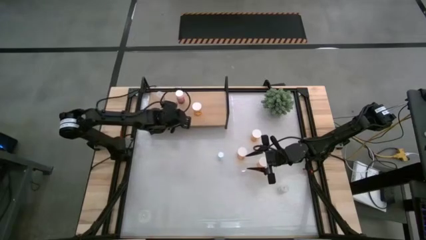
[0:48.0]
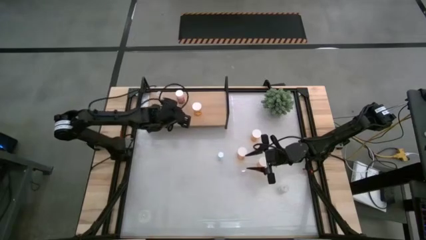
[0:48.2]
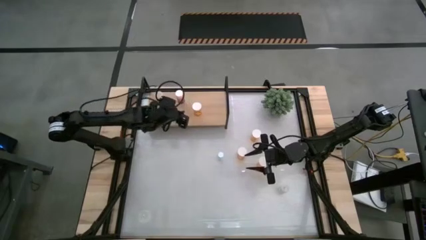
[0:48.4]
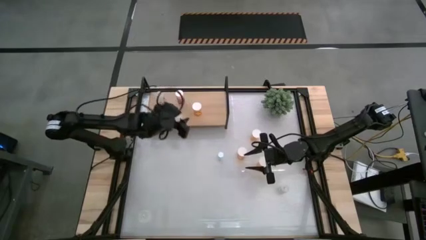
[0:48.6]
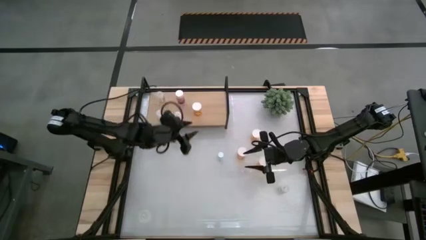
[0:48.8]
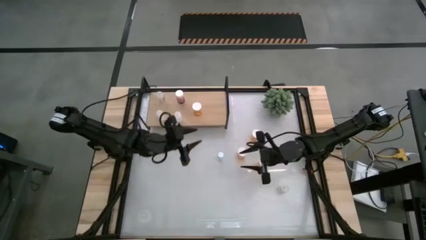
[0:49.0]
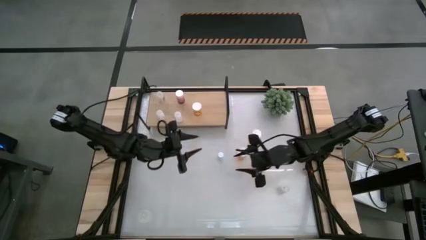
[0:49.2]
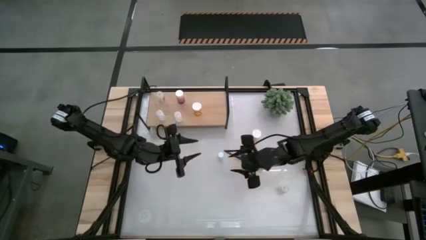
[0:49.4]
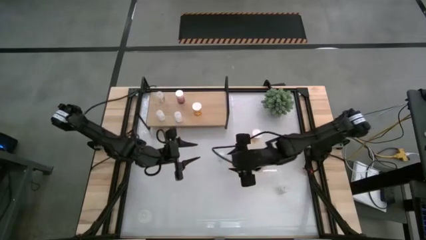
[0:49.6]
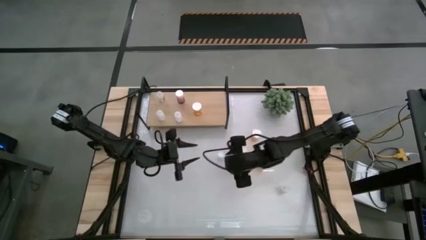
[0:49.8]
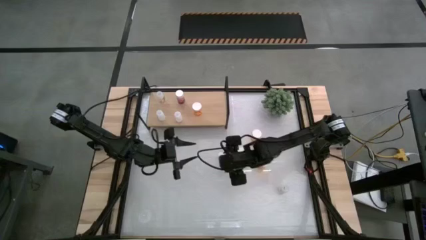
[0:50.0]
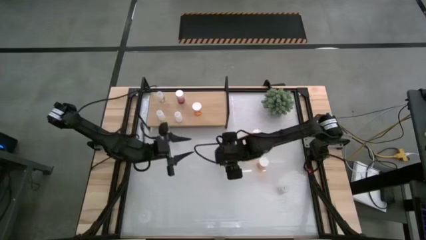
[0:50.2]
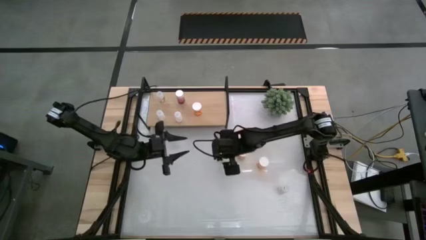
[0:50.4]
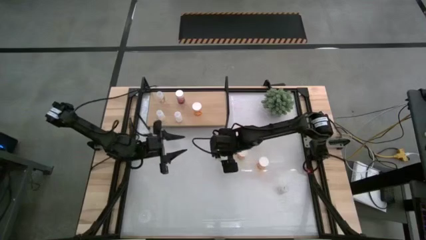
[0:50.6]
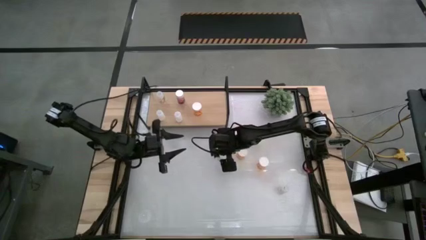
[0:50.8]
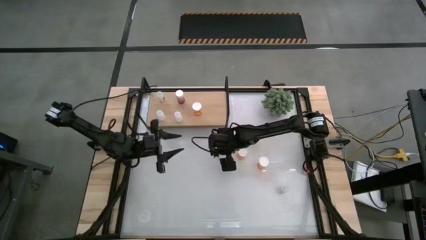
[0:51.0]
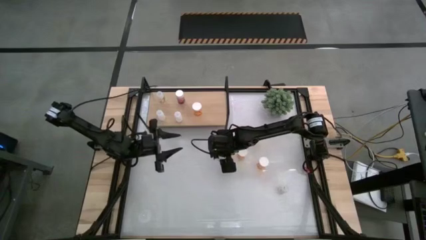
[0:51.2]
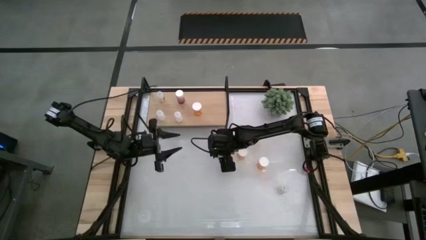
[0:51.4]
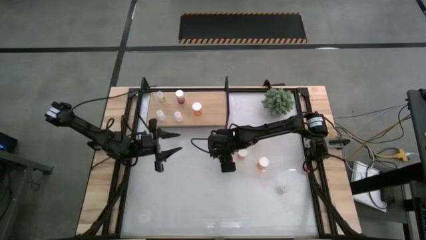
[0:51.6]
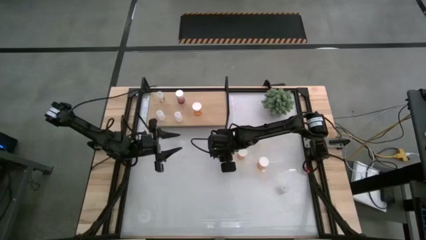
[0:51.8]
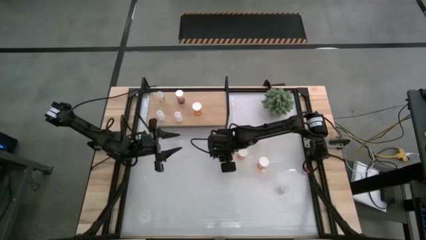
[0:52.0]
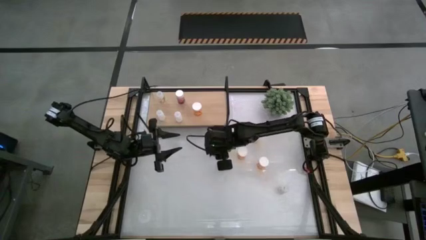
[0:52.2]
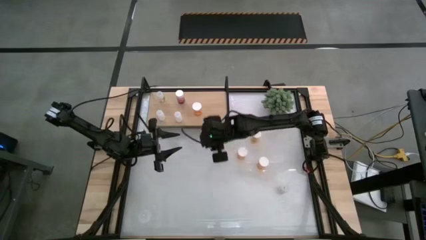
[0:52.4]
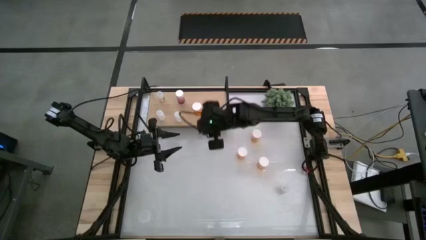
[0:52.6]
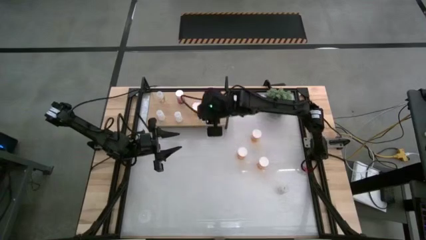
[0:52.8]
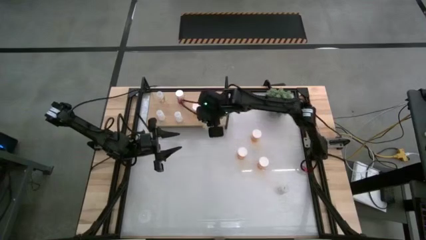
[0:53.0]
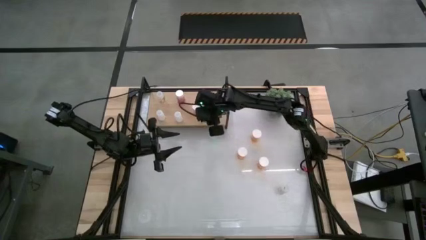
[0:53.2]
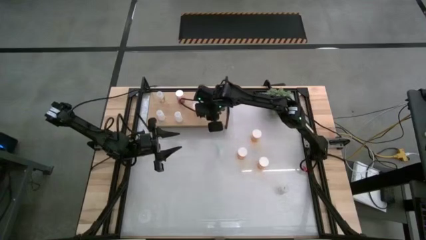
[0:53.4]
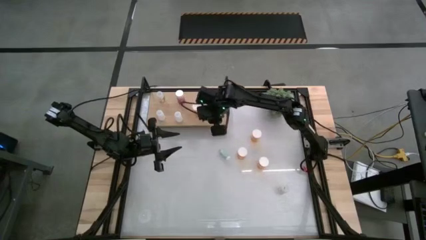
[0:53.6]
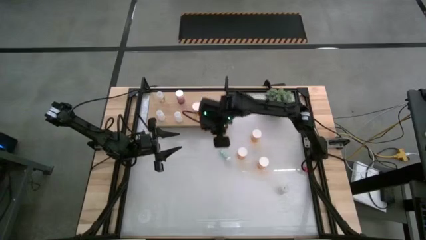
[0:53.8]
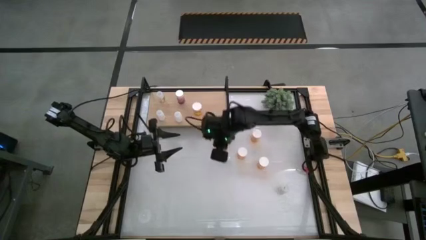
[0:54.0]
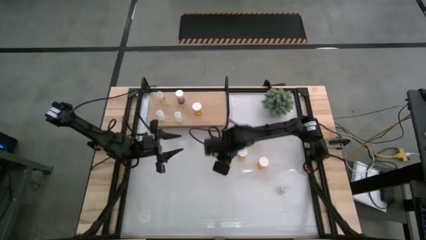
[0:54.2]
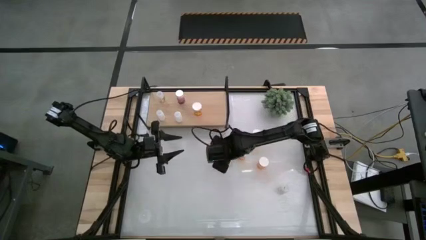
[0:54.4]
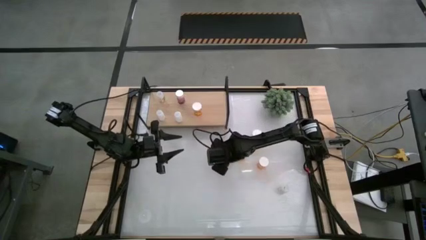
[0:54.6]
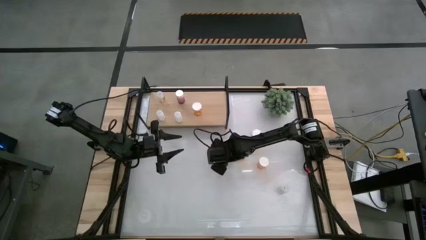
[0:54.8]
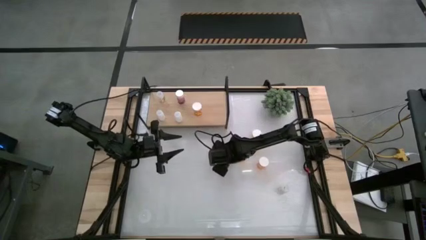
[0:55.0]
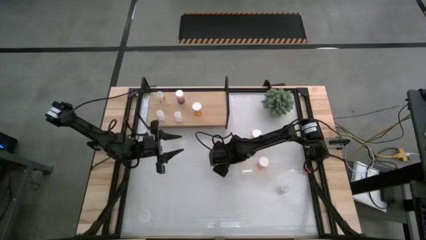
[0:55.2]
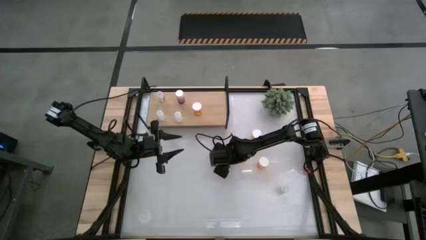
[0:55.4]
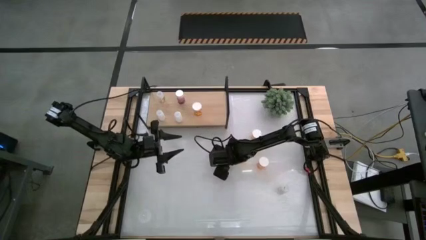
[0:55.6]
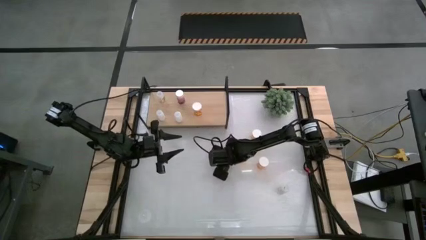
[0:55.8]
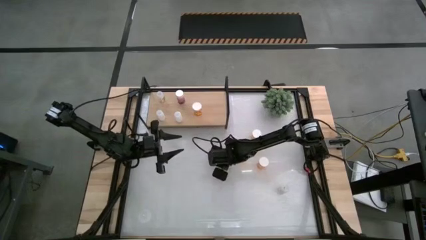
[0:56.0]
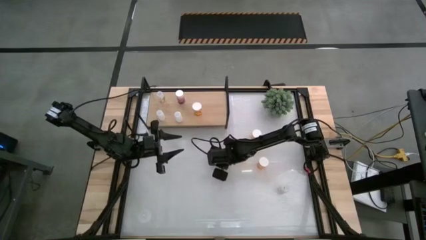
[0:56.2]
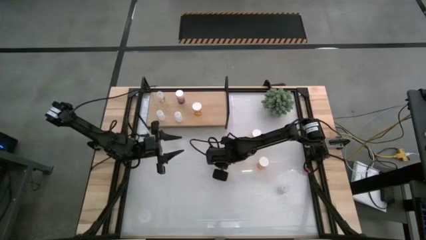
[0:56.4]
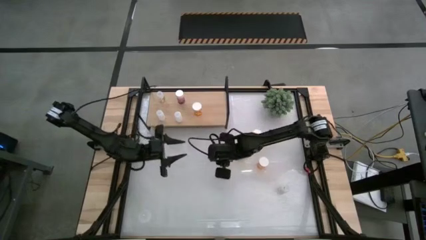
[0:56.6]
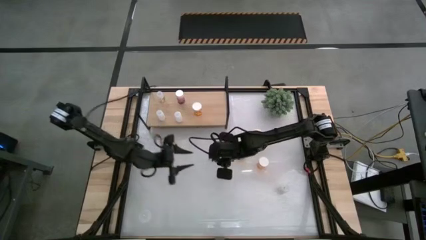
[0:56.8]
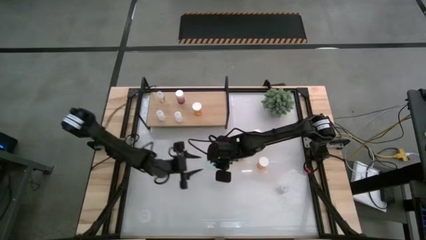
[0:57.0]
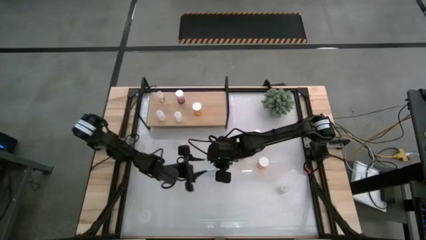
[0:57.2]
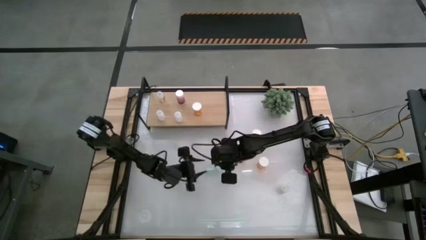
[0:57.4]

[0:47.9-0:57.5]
Task: Pick and place medicine bottles onto shelf by color
Put the blue pill bottle on the shelf

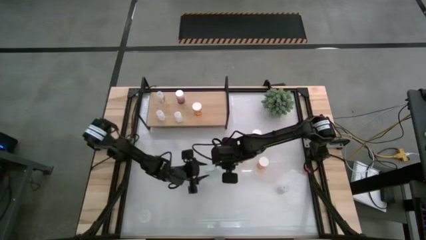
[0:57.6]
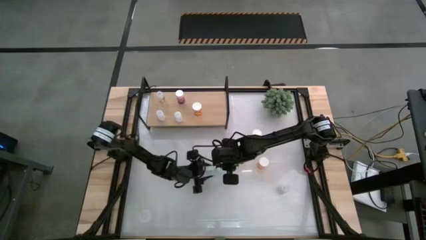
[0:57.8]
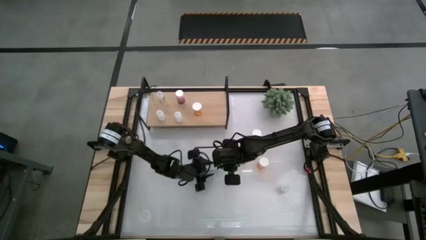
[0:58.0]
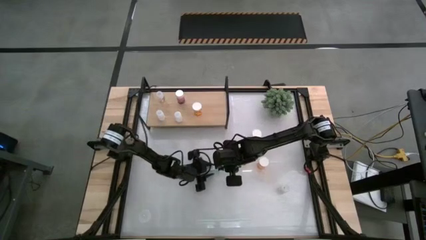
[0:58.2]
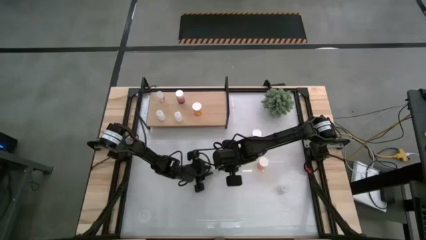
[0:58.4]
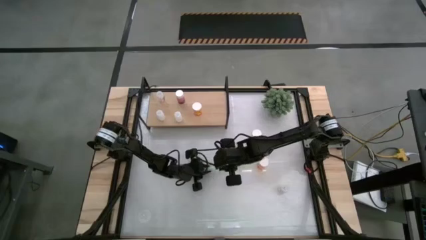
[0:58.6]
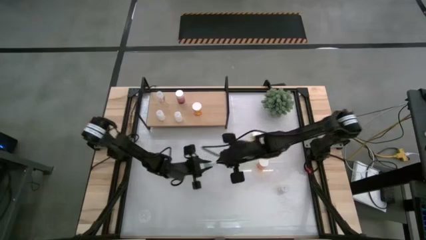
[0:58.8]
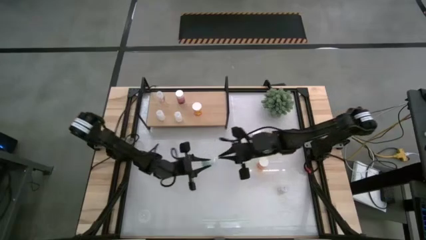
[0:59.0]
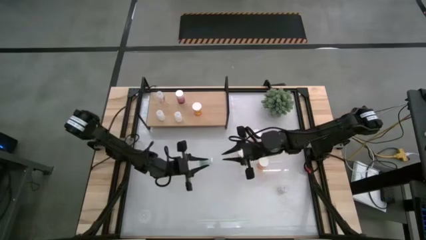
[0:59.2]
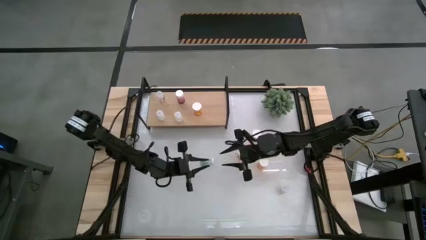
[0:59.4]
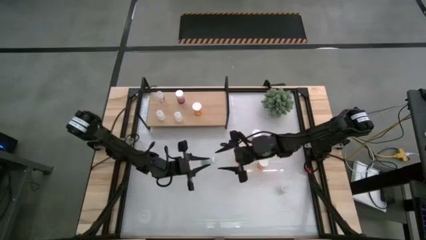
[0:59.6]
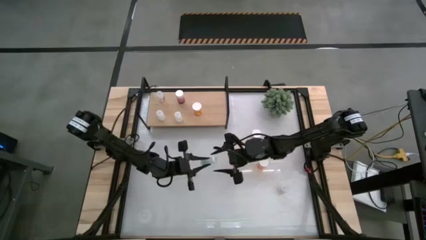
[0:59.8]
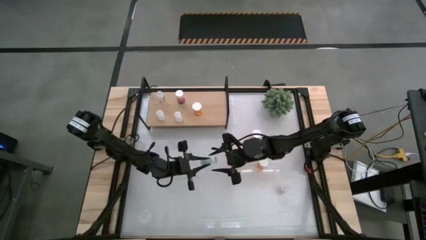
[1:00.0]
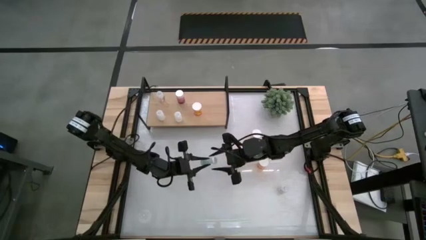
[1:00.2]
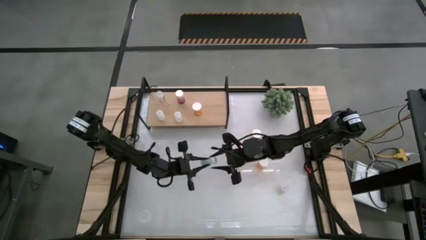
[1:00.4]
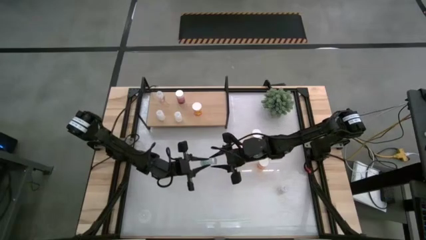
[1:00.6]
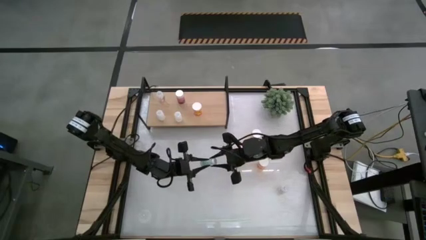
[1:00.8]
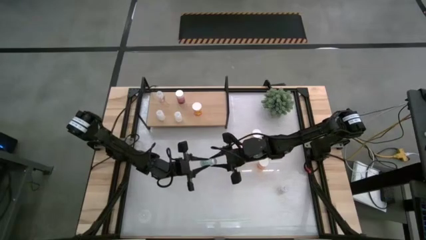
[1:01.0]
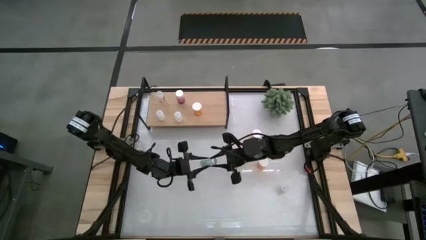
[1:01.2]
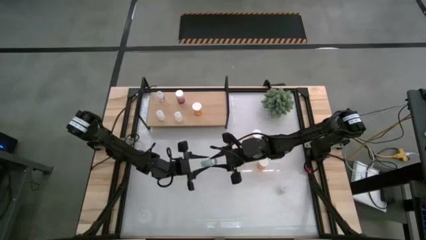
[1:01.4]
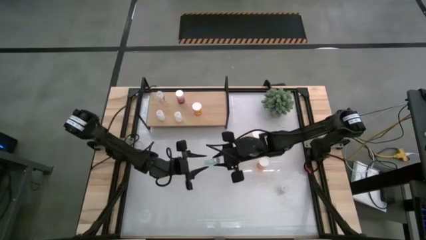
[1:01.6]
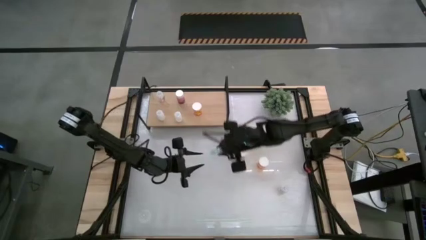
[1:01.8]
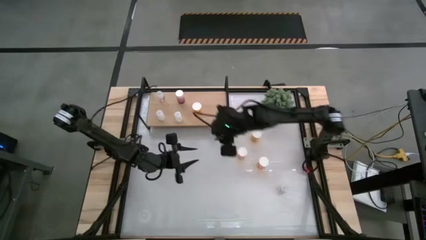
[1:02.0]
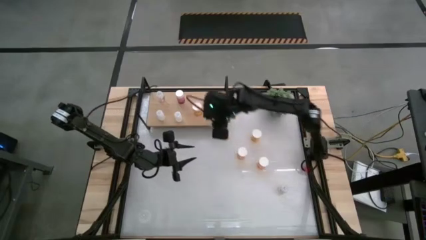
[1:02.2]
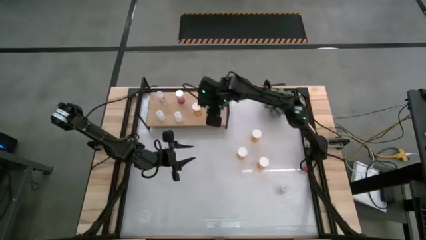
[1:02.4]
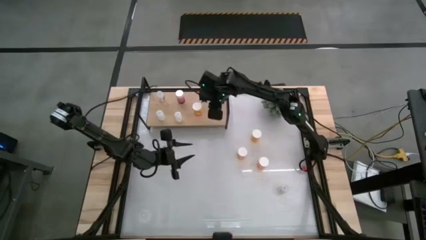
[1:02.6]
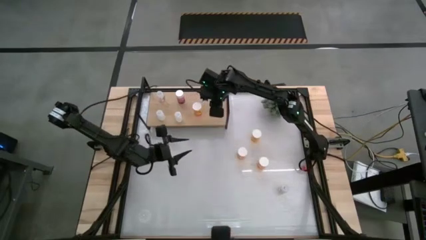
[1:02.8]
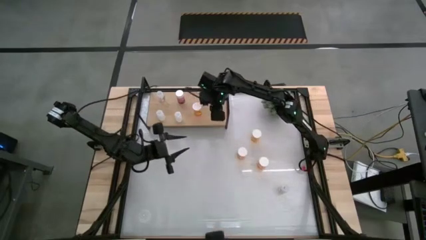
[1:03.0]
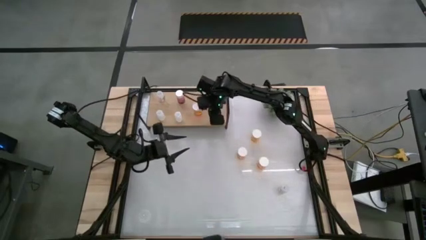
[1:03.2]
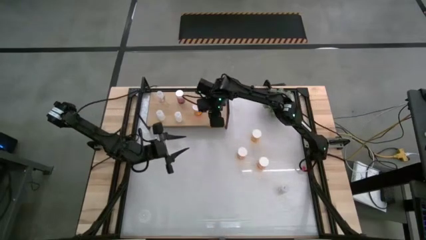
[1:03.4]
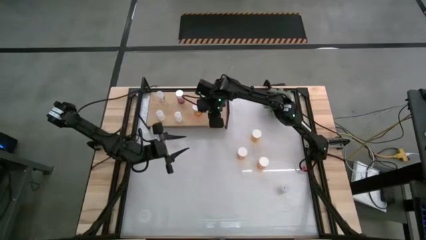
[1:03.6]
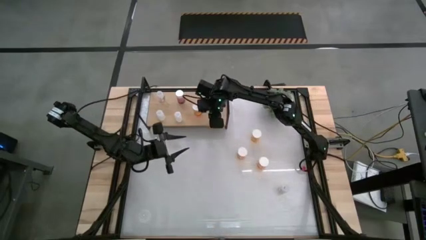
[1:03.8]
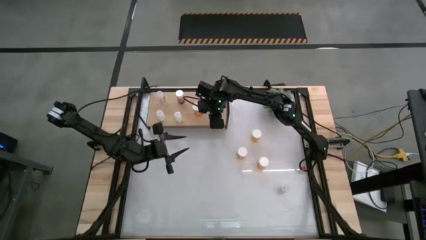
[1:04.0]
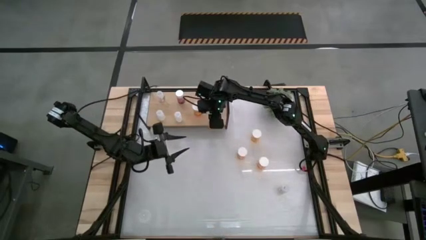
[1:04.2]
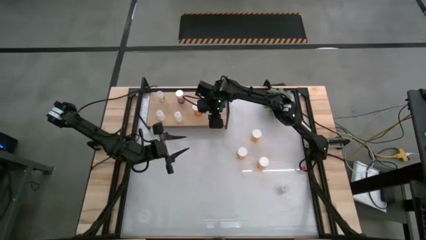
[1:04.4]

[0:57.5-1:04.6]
Put the blue pill bottle on the shelf
